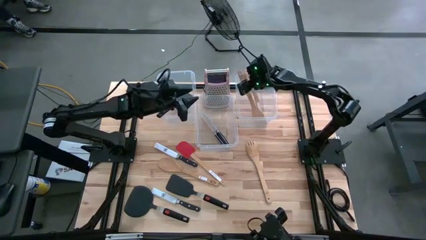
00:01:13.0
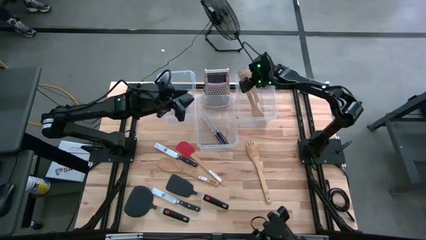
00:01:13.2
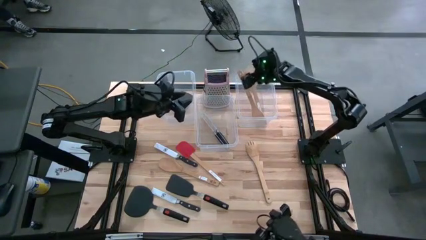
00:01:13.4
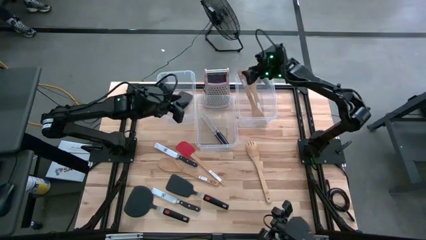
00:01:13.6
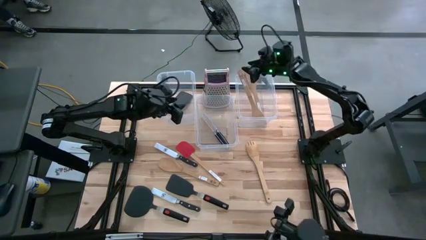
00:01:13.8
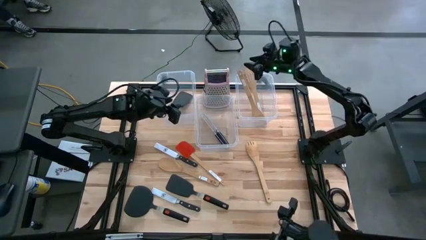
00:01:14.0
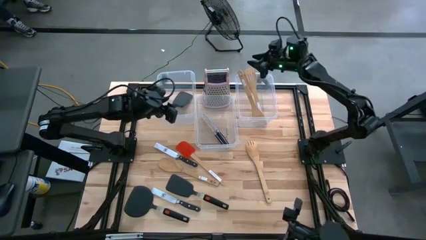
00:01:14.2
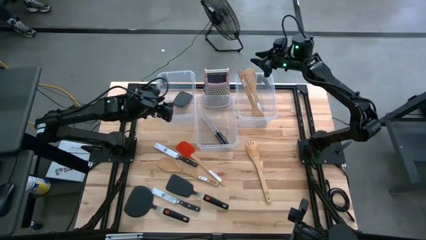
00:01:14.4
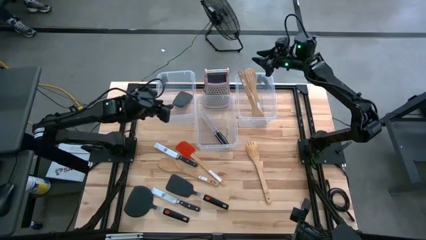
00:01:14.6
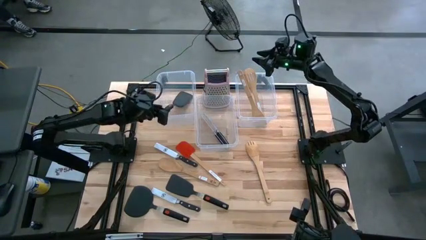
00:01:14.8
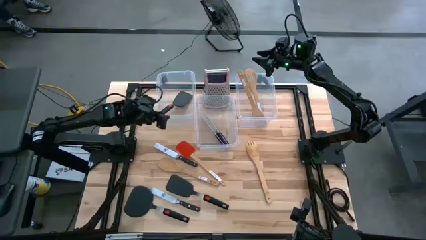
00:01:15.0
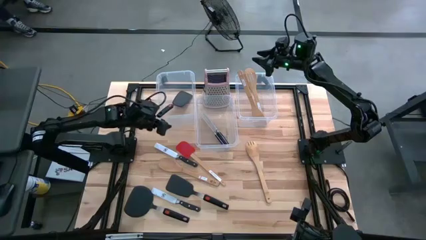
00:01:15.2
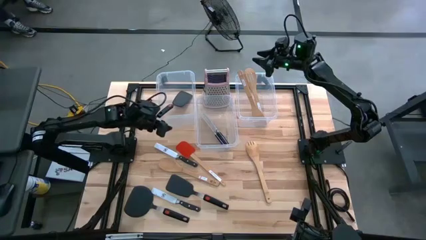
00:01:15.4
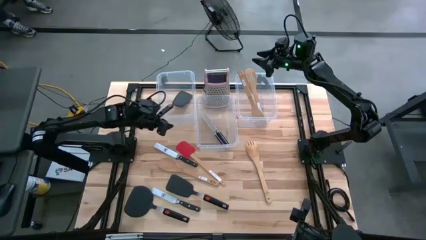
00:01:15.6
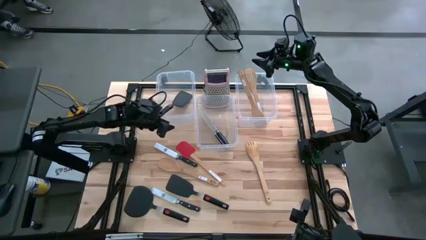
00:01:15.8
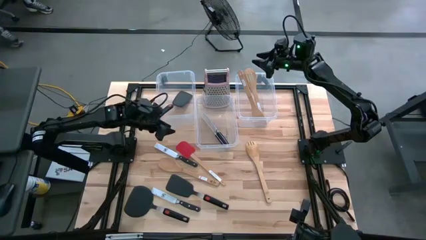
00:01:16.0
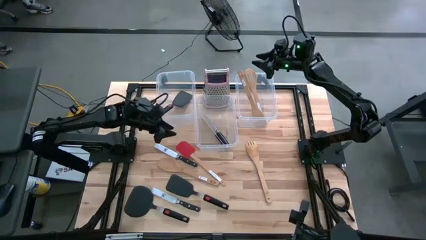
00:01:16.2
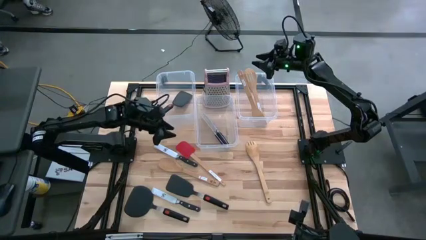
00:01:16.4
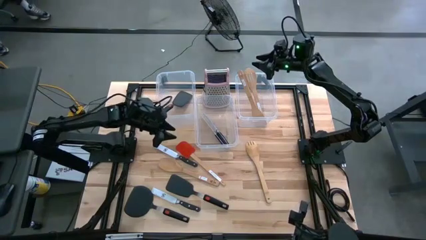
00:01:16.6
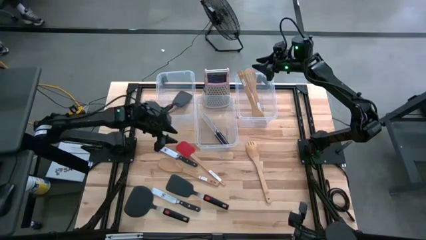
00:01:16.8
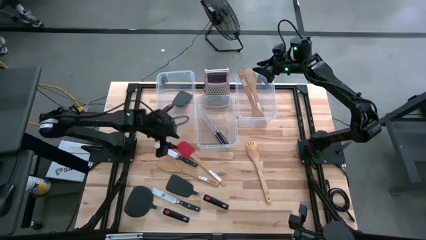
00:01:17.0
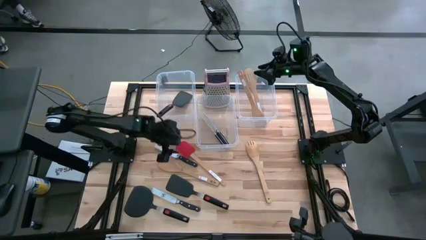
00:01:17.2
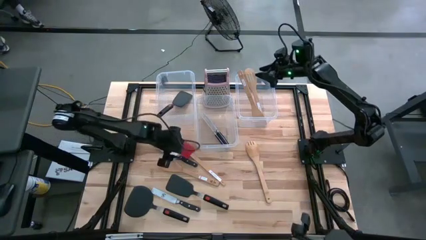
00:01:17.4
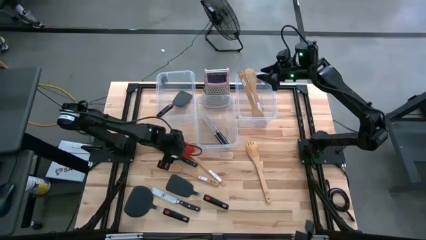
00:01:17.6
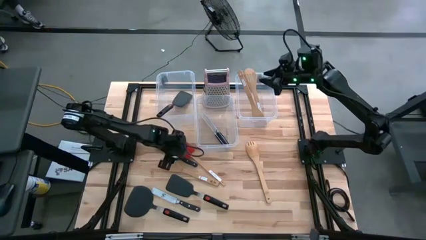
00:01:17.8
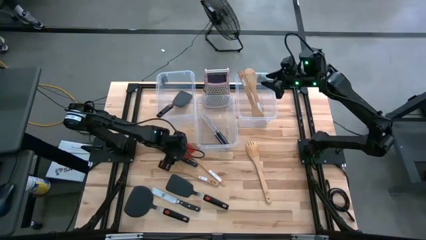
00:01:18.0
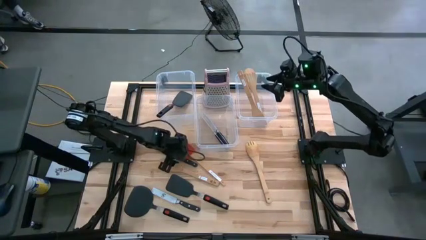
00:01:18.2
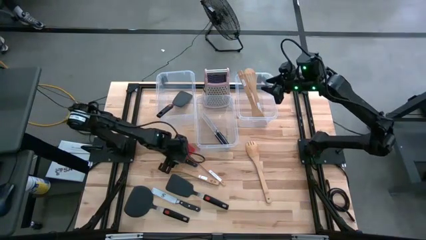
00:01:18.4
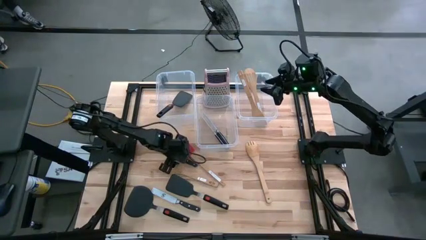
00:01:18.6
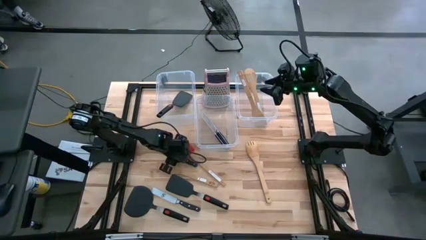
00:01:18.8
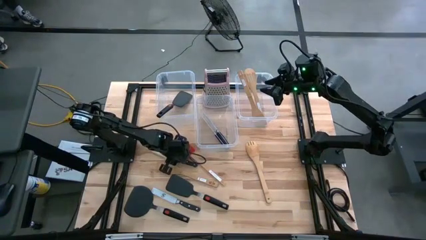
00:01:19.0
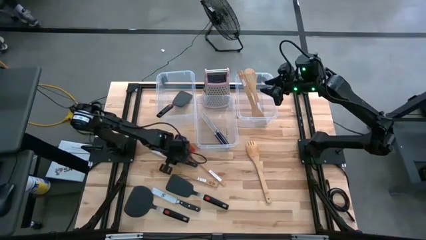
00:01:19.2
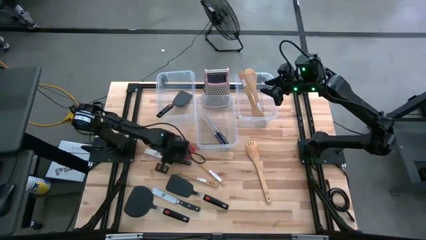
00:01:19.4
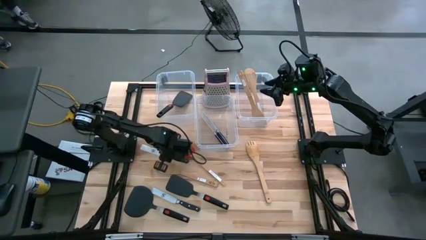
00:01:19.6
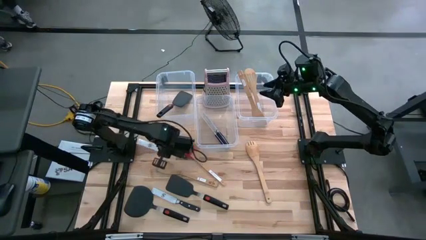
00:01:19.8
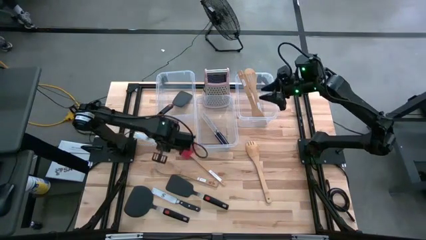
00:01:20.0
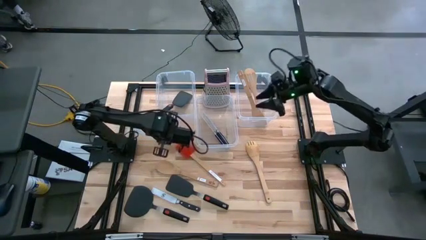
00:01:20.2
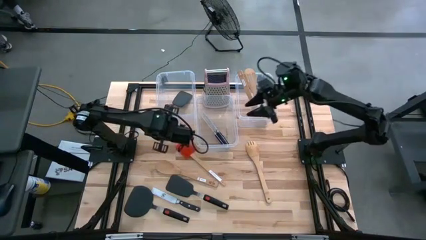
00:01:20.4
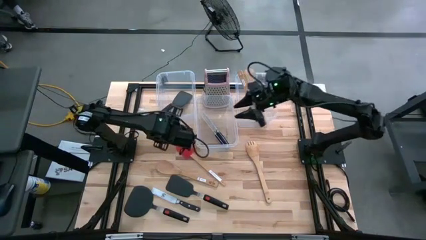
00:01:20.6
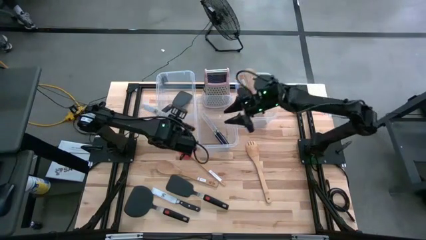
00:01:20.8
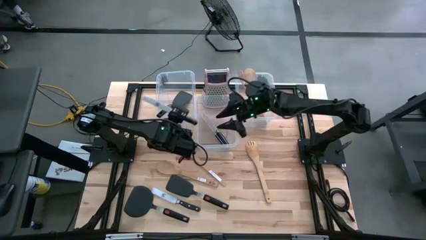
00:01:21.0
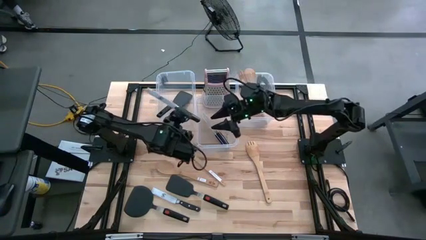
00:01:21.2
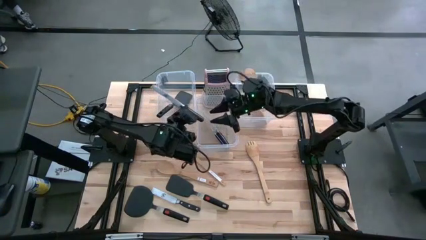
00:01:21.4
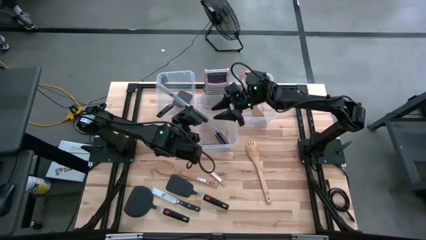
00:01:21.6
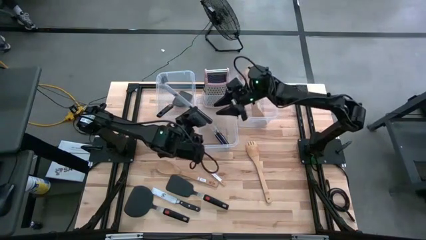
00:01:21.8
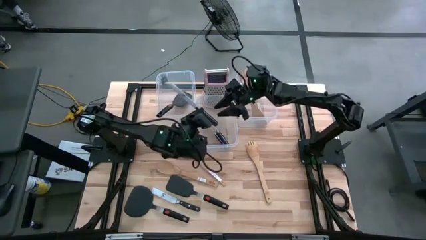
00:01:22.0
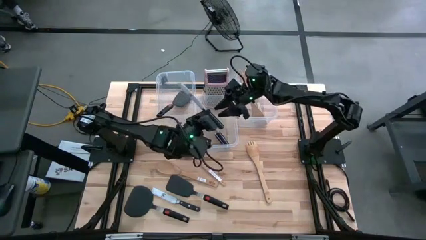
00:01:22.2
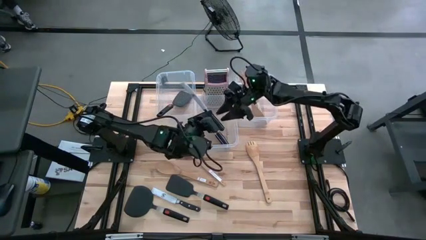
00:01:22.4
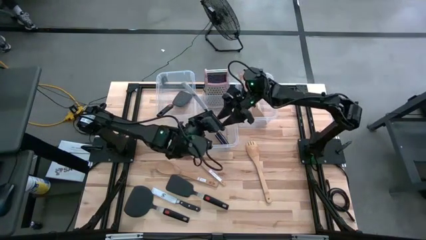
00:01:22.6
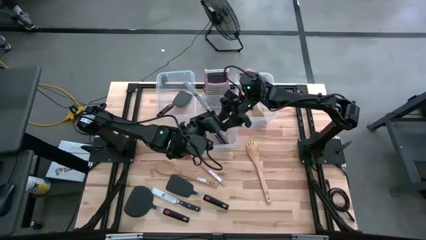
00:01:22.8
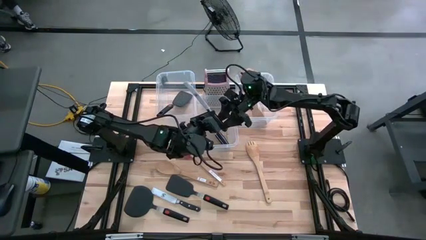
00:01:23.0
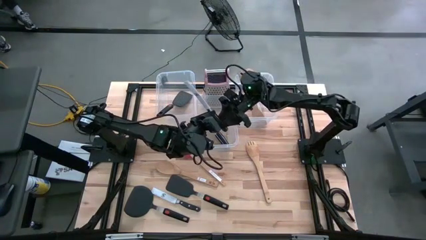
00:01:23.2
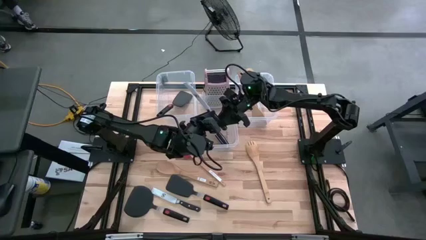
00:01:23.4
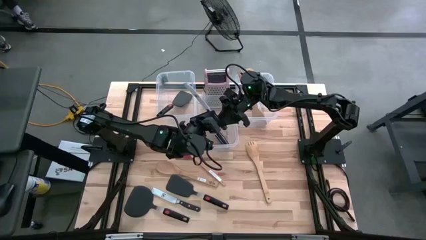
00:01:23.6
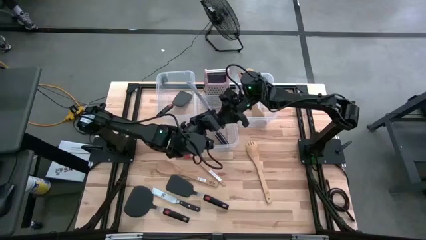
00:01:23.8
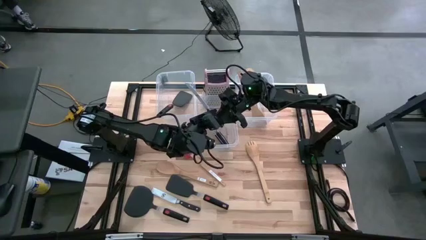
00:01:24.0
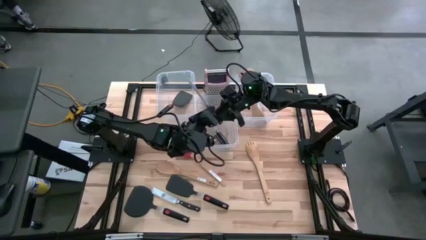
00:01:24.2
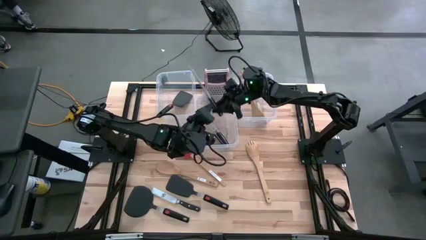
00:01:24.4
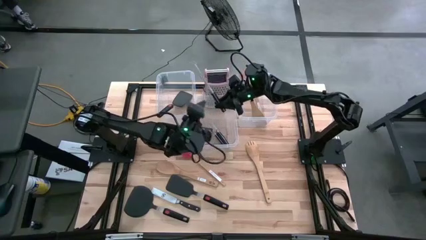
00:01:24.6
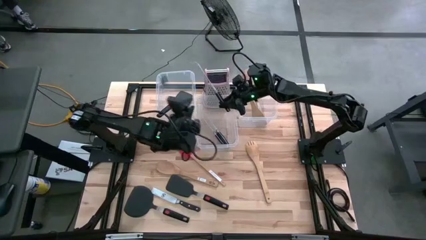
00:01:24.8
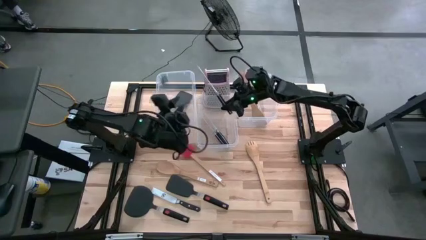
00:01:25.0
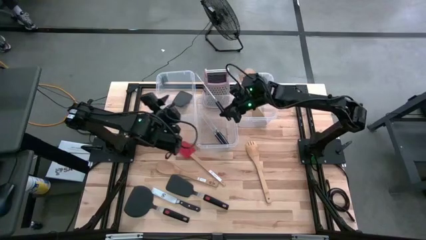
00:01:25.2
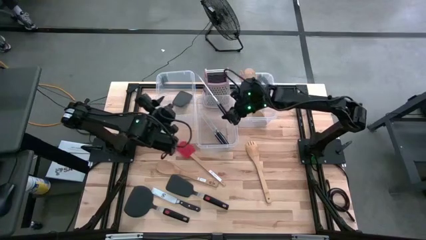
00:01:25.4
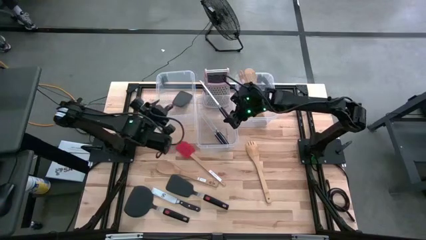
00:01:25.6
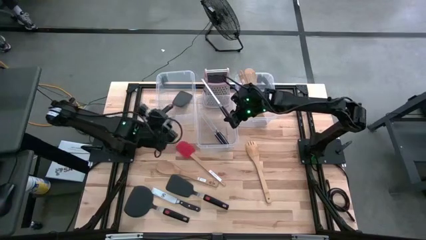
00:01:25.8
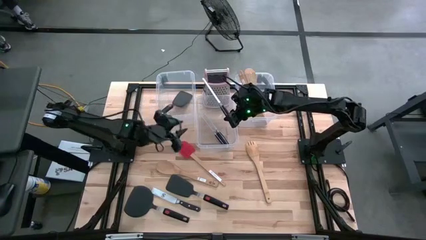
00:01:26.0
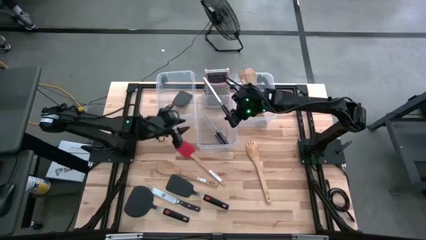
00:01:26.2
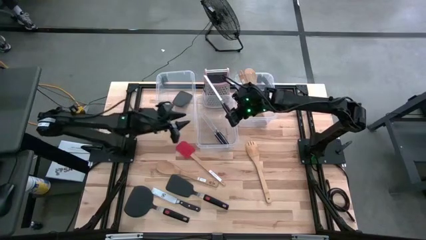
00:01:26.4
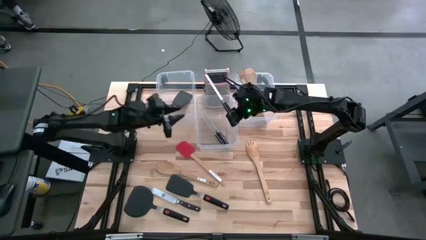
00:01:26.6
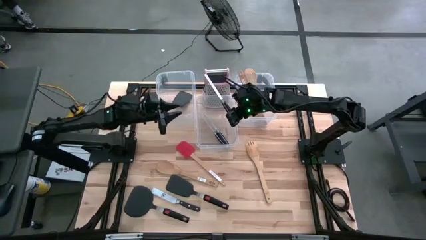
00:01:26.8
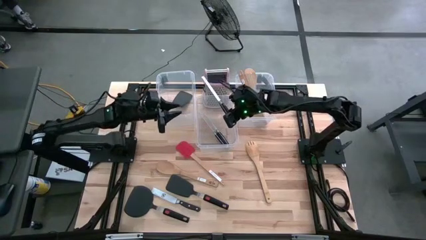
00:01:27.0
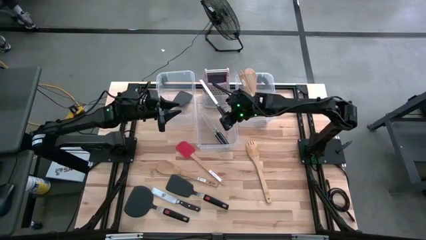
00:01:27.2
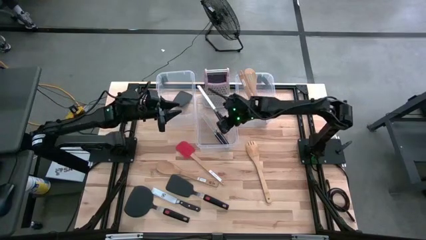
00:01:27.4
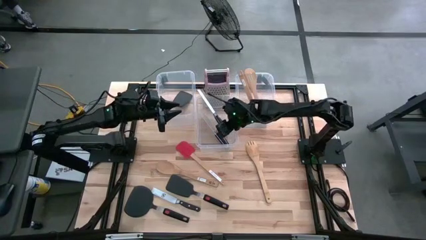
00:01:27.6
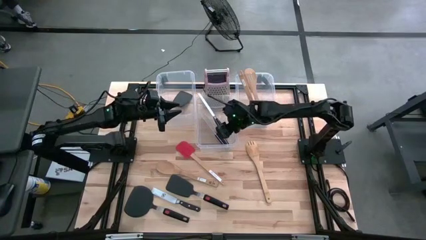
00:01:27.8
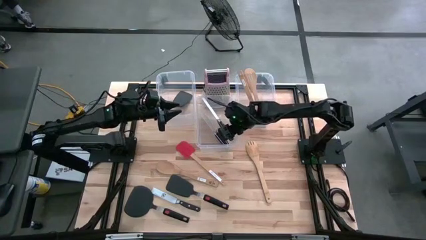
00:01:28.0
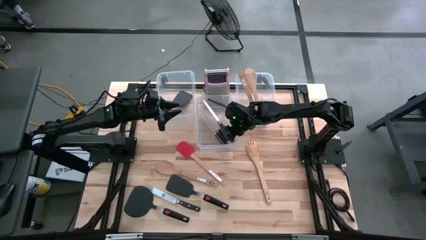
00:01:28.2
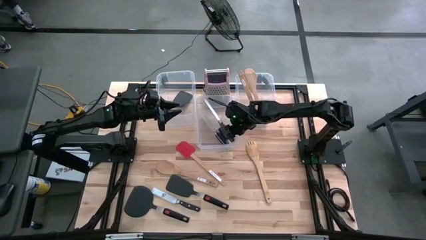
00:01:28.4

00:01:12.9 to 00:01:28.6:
Task: Pick & Place Kitchen Items
Put the black table knife into the middle transparent bin
